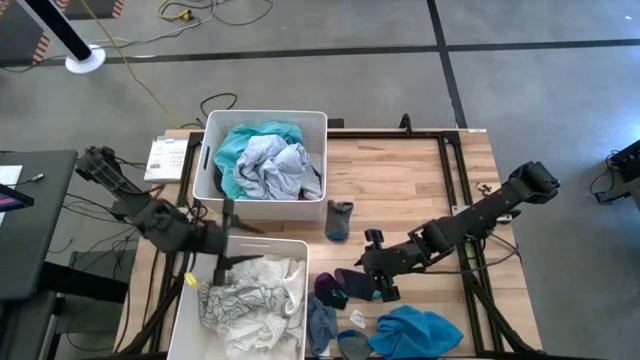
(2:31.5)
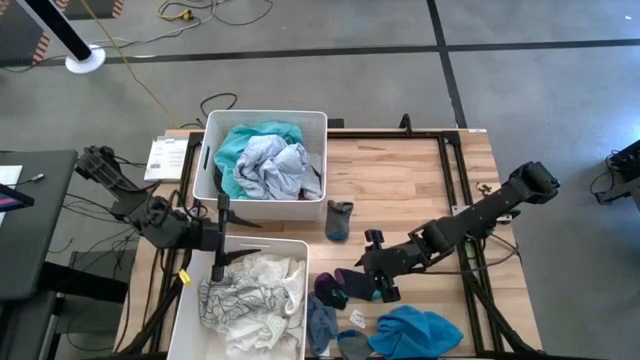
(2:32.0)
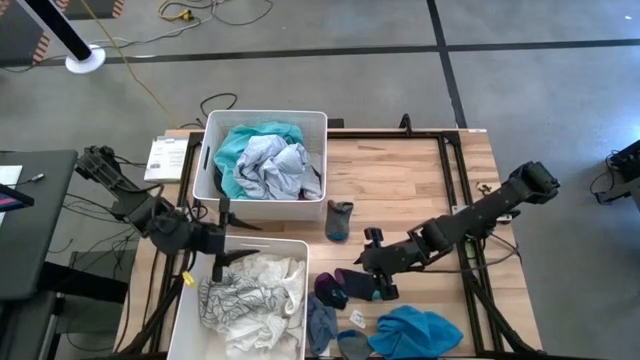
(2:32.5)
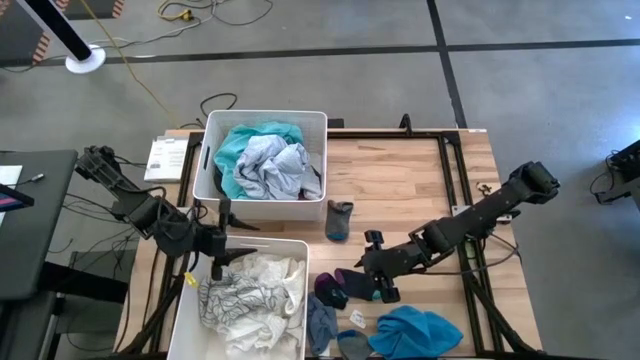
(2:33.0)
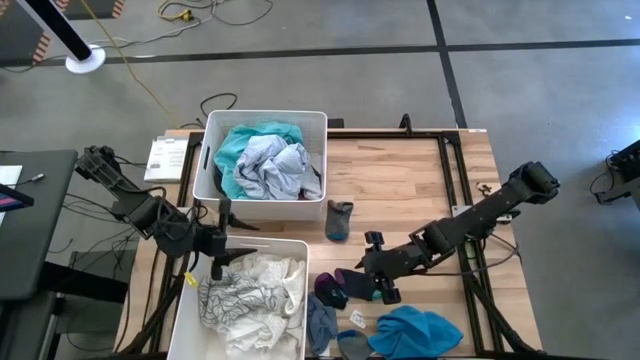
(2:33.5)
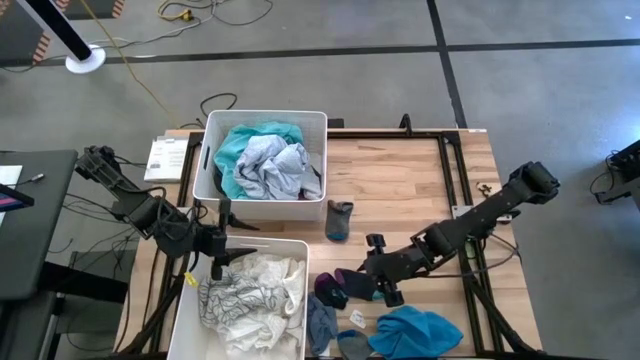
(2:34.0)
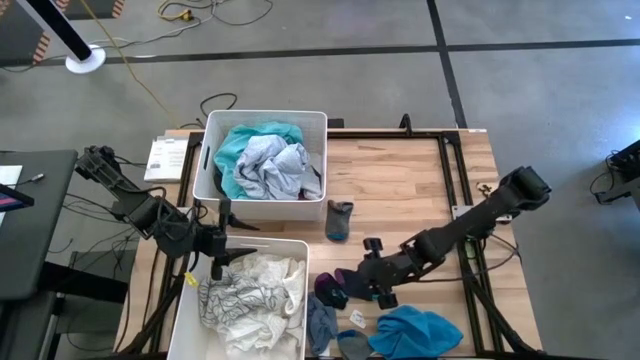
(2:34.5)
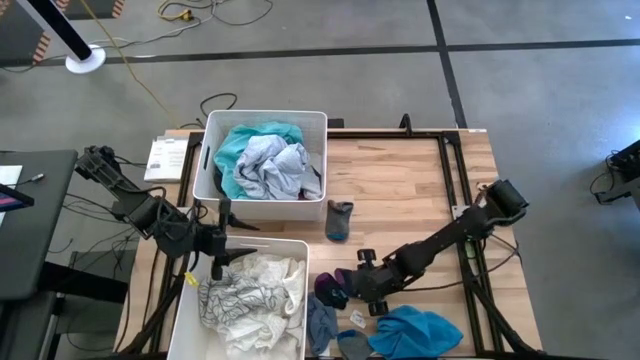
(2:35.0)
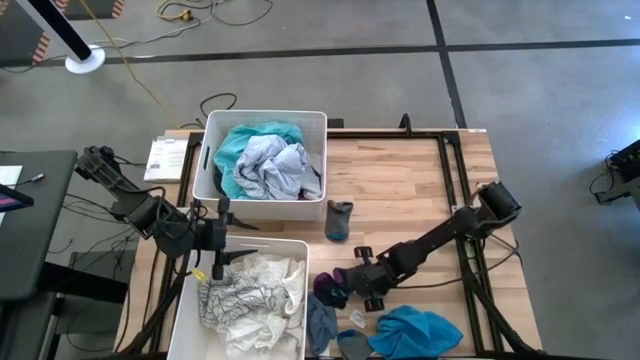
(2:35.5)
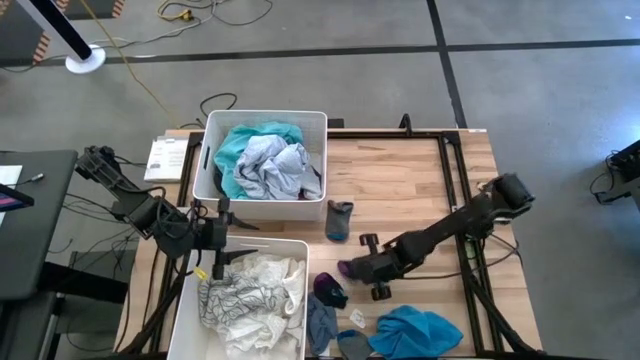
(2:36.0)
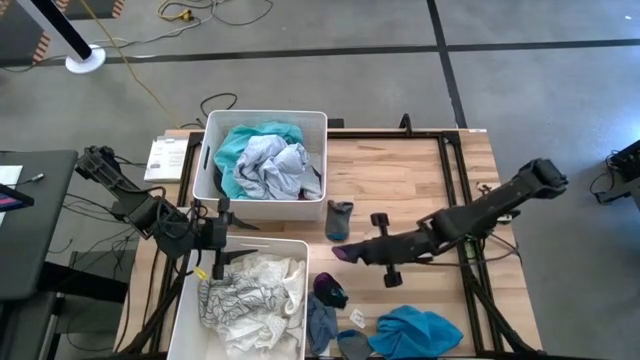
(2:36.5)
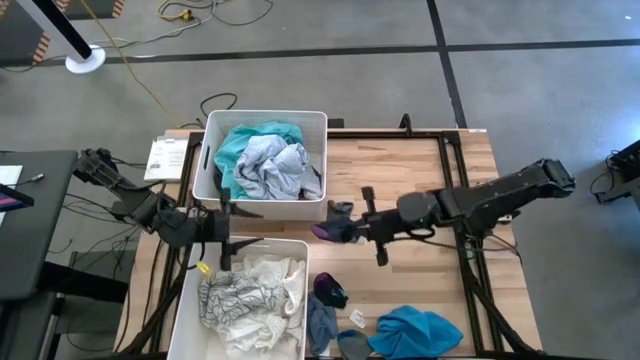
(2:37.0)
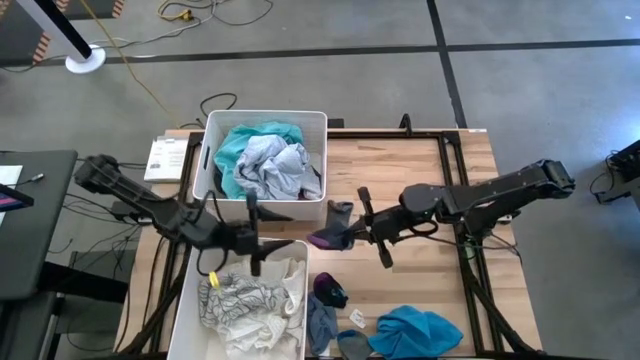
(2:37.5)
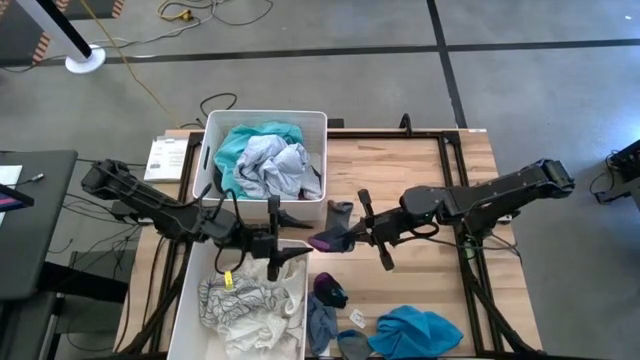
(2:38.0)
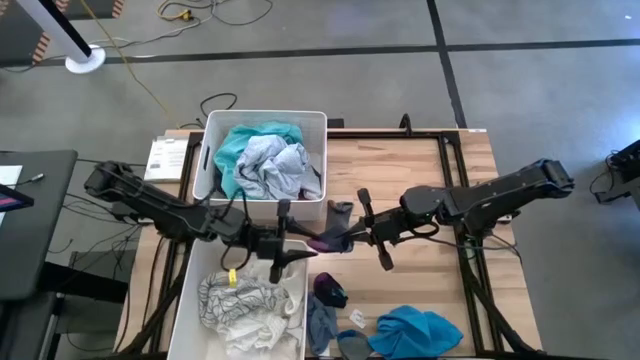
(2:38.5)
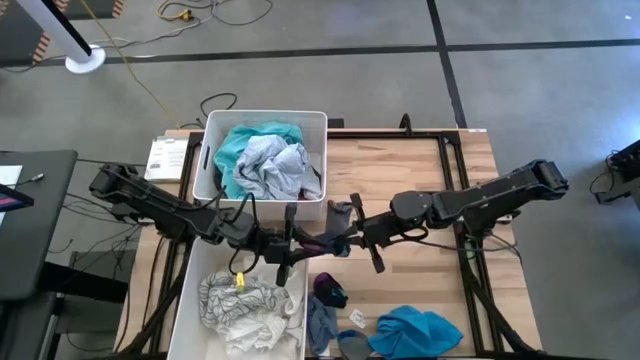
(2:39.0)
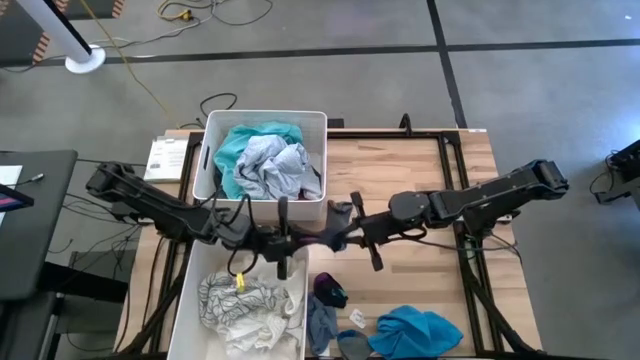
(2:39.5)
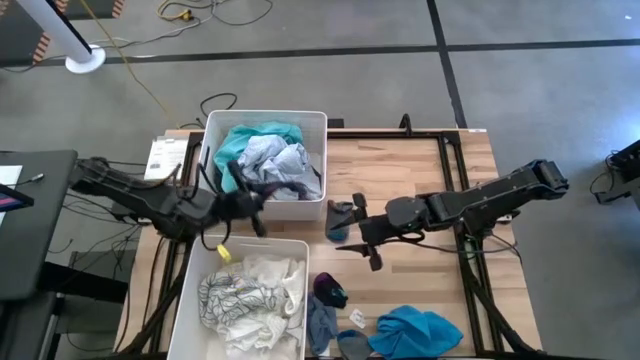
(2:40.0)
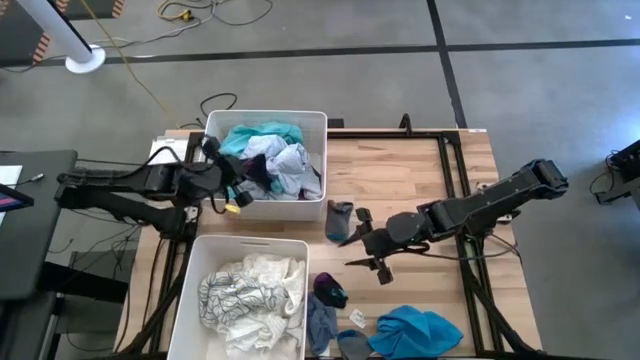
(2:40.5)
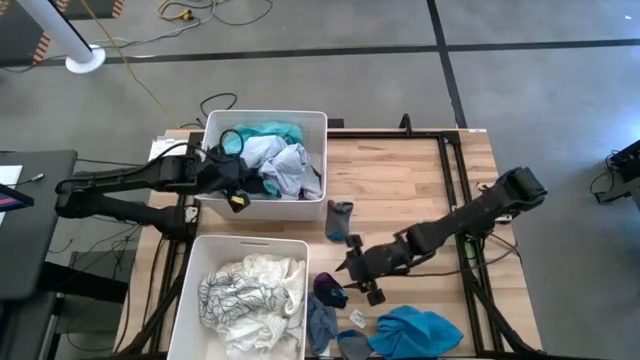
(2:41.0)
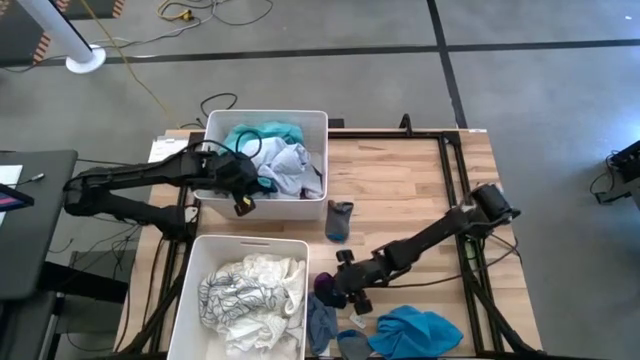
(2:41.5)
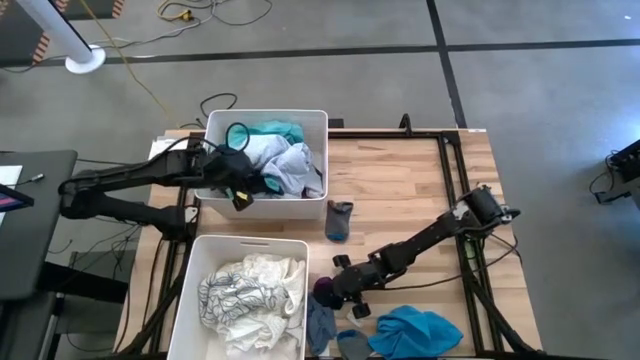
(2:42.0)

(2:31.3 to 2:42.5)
Task: Sort clothes
Put the right dark blue sock into the top white laundry bin

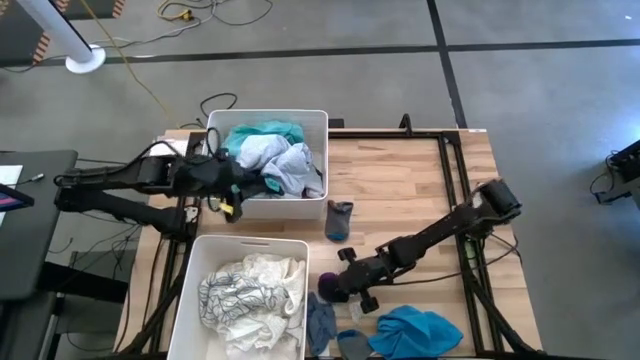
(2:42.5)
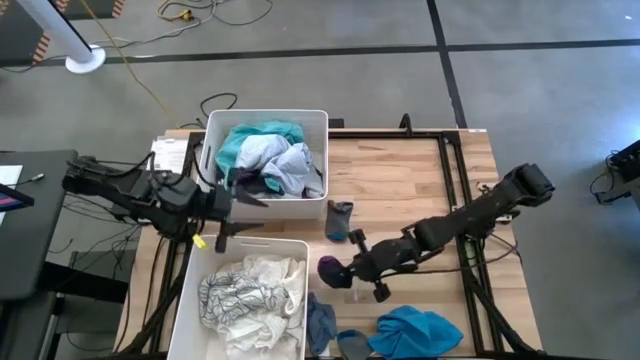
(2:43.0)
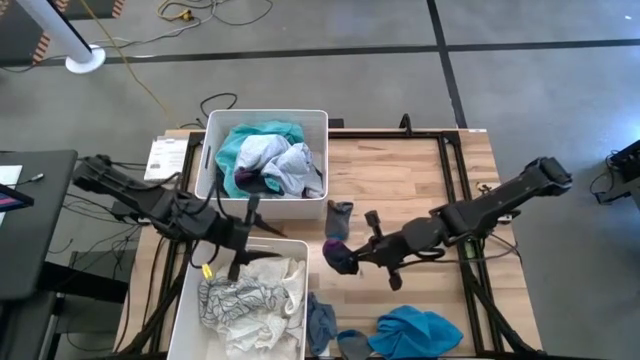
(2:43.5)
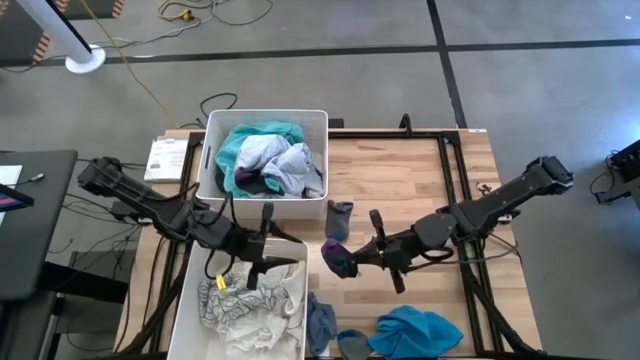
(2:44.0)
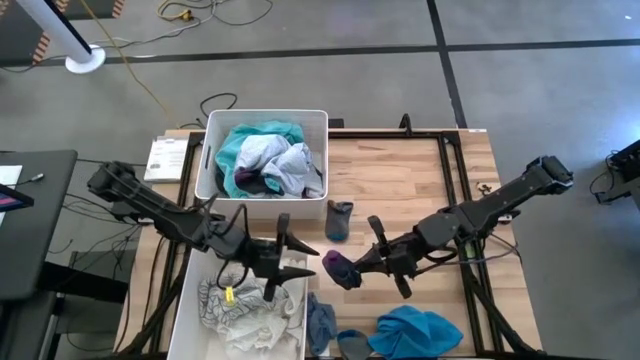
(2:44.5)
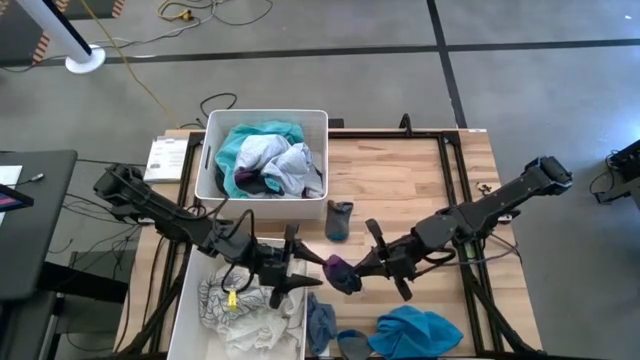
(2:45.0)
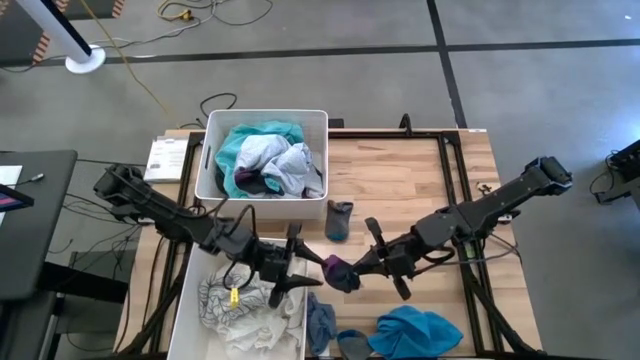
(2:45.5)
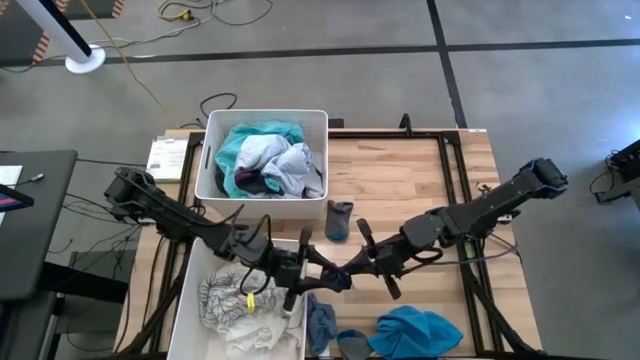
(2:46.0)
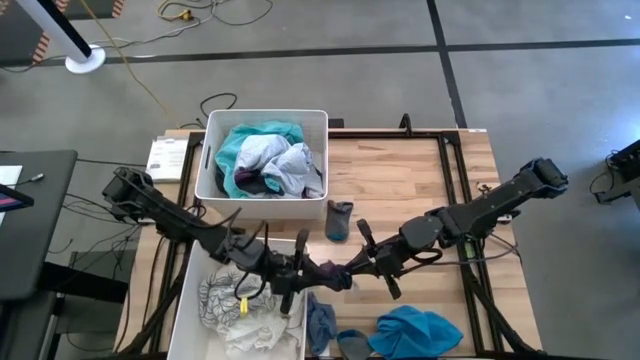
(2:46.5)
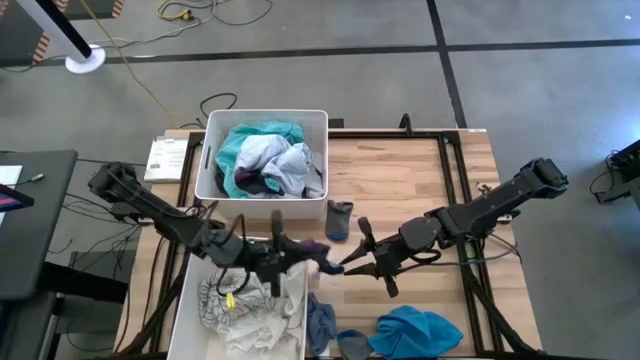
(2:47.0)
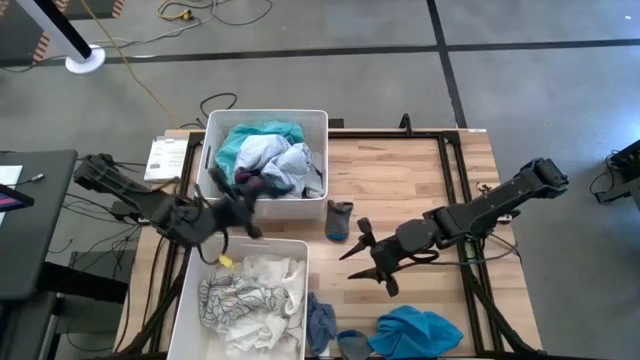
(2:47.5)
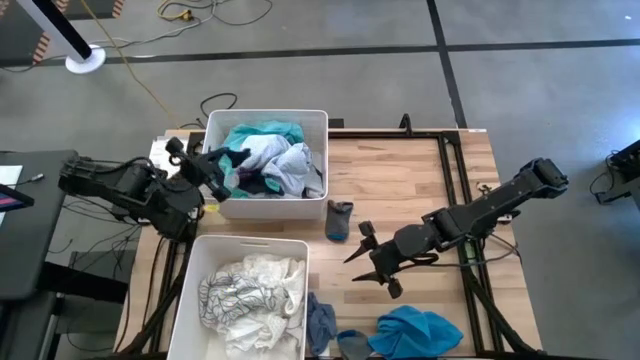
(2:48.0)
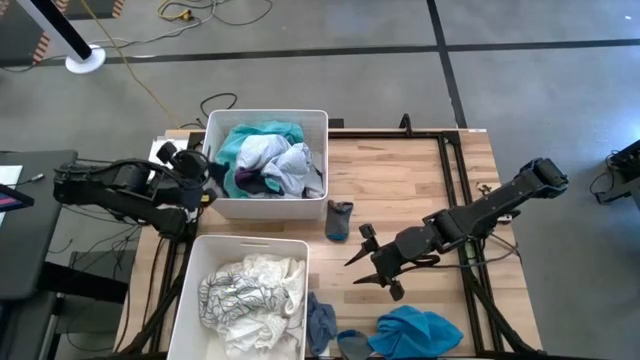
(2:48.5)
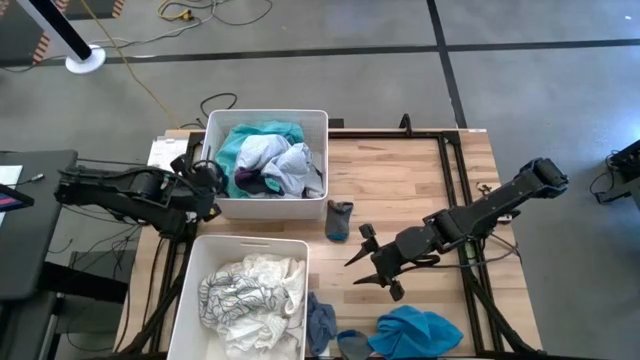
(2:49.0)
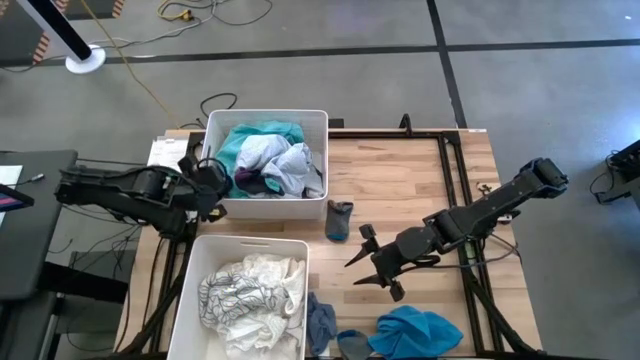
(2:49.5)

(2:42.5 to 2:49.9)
Put the dark blue sock into the top white laundry bin

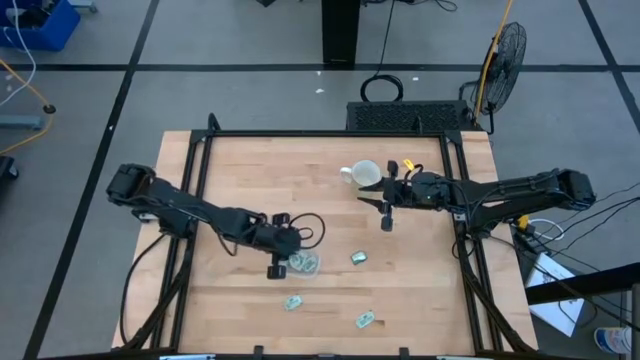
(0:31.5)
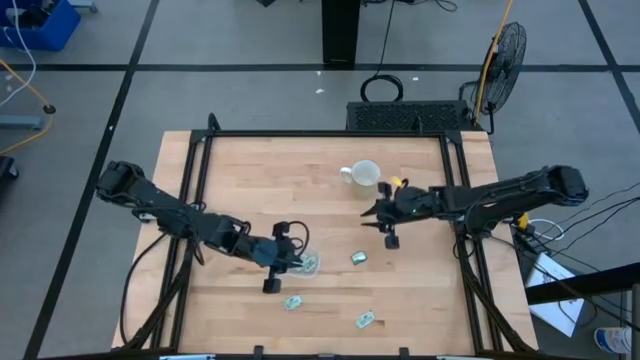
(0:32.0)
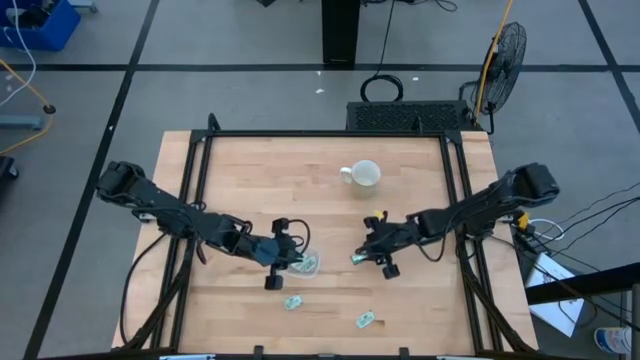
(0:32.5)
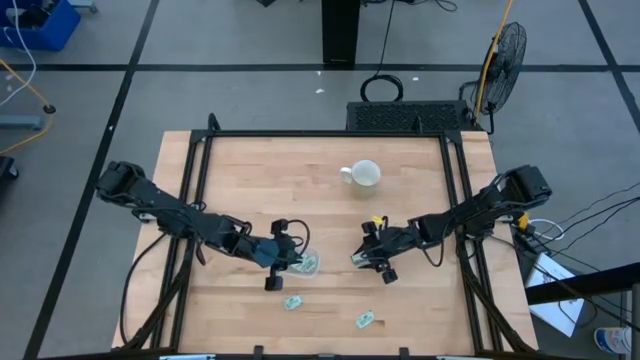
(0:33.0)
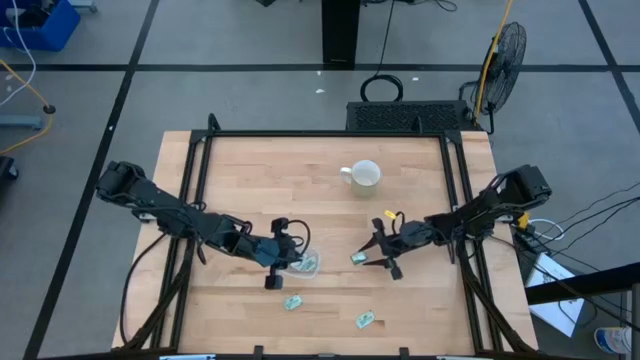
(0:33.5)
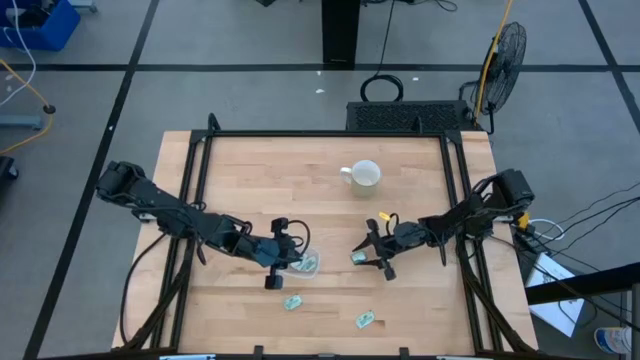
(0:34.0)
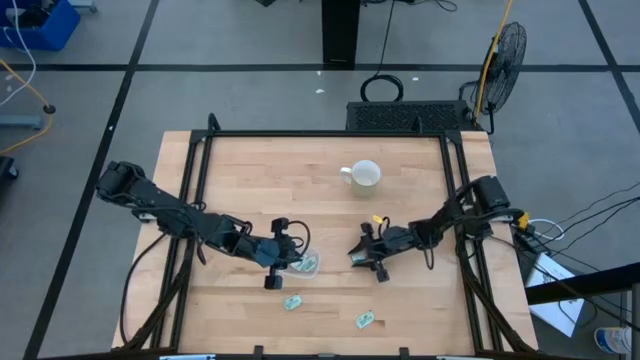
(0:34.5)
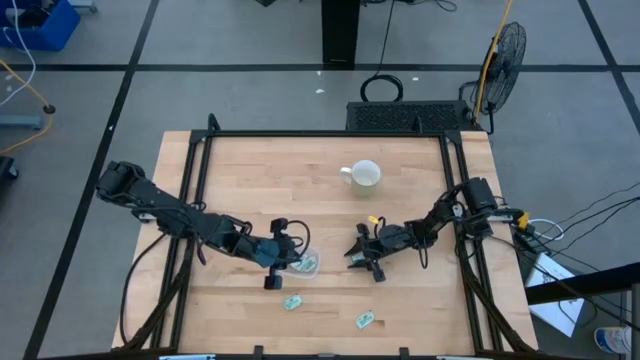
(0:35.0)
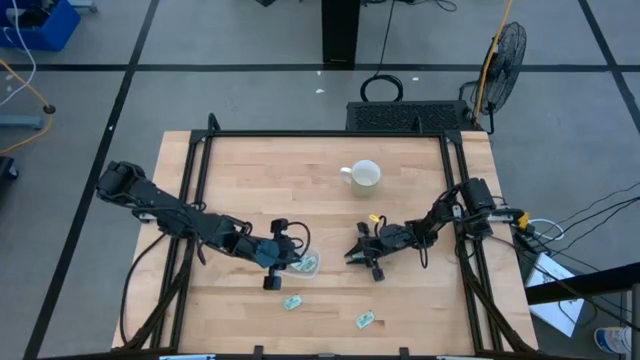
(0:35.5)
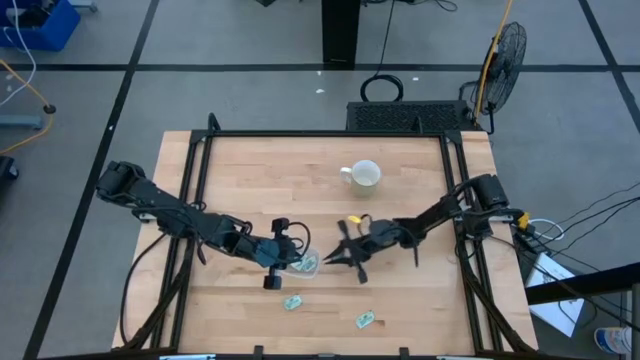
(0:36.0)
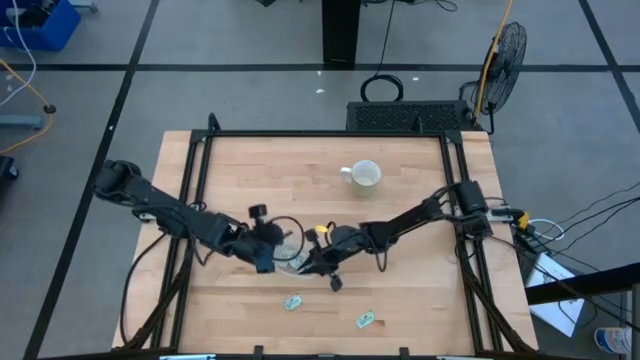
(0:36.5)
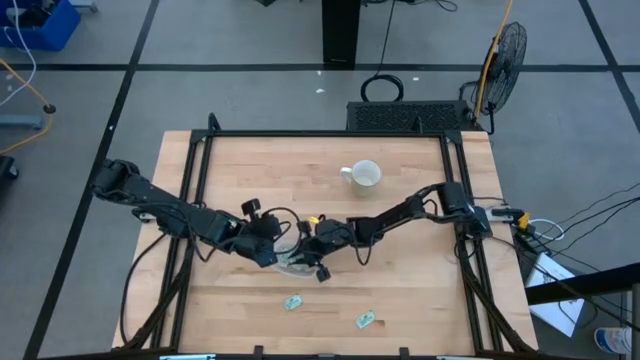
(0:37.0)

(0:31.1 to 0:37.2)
Task: Pick and place Stevia / Truvia into bins
Put the green stevia packet into the transparent bin
